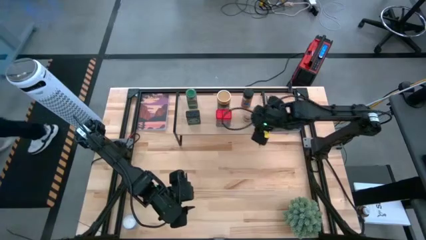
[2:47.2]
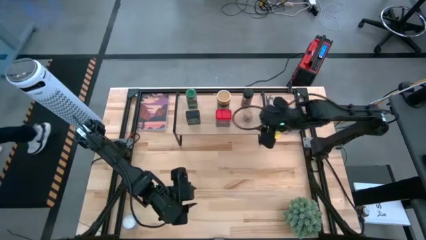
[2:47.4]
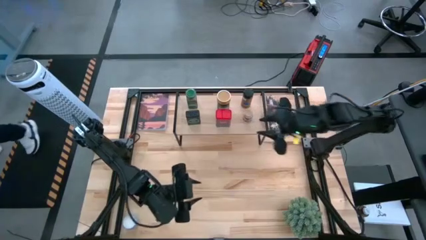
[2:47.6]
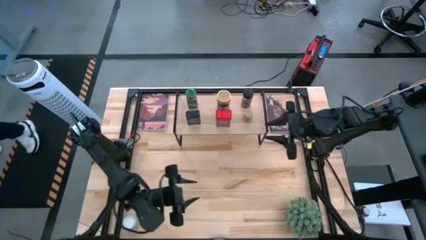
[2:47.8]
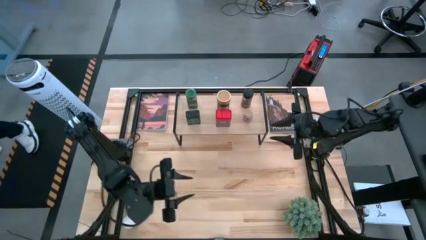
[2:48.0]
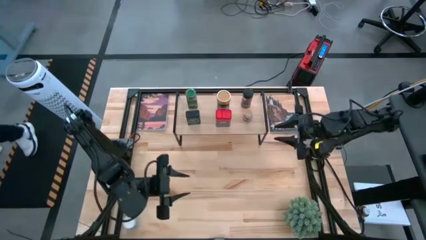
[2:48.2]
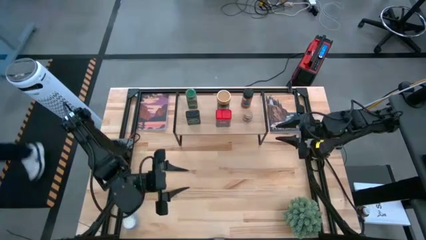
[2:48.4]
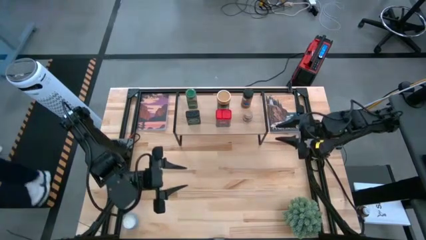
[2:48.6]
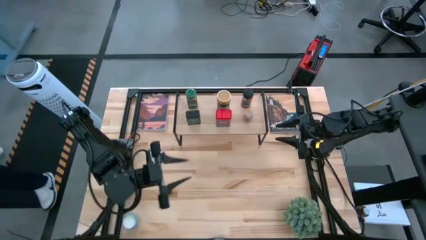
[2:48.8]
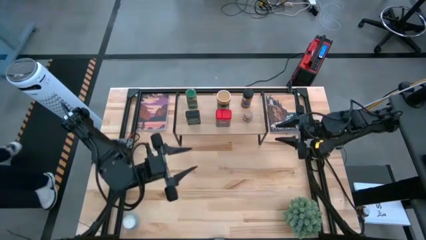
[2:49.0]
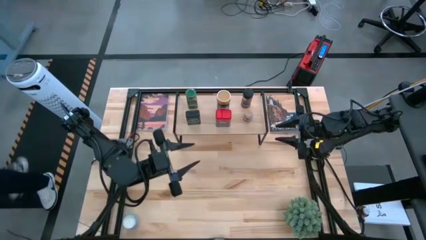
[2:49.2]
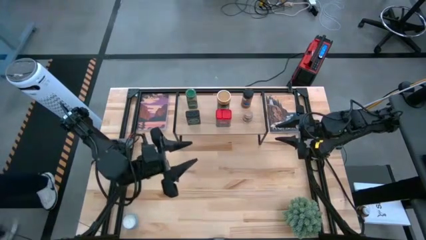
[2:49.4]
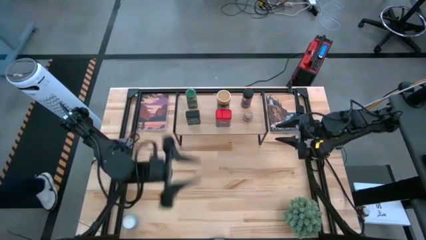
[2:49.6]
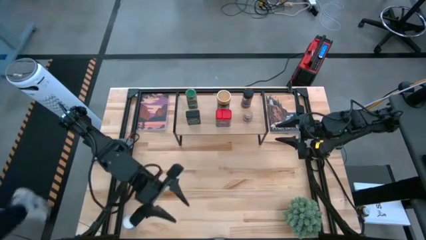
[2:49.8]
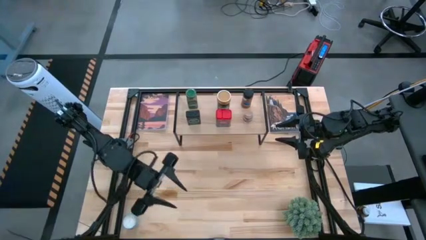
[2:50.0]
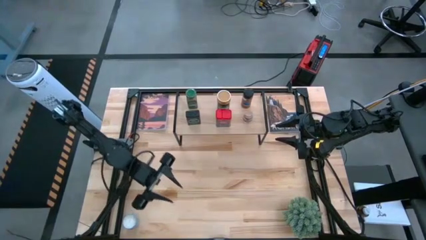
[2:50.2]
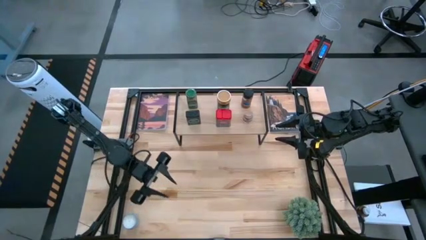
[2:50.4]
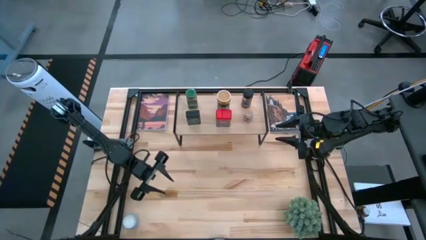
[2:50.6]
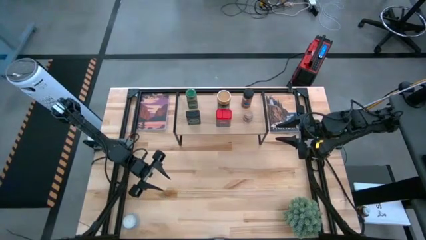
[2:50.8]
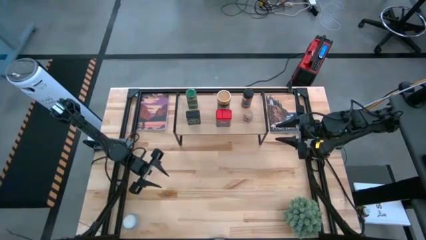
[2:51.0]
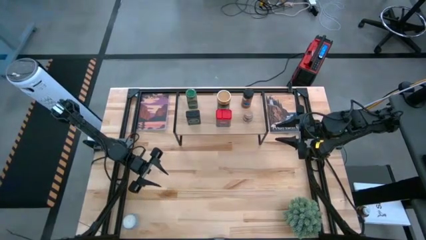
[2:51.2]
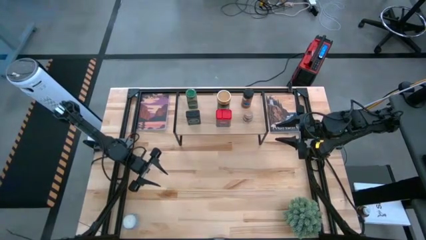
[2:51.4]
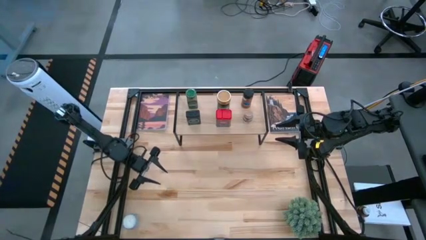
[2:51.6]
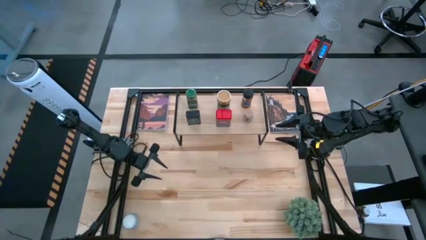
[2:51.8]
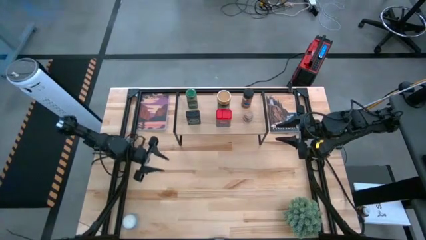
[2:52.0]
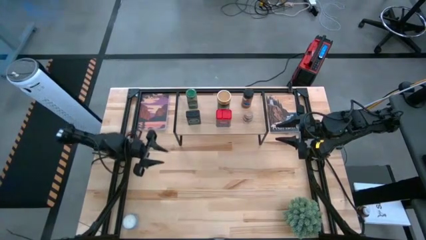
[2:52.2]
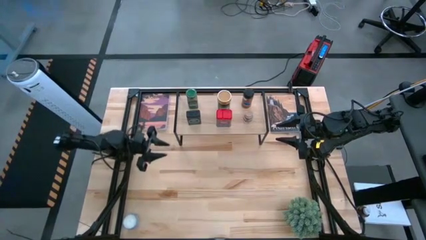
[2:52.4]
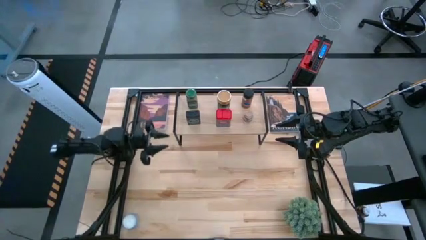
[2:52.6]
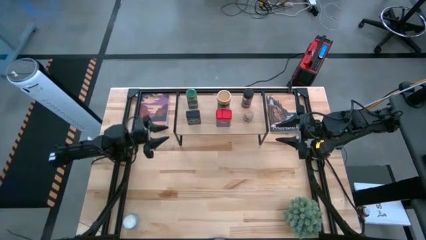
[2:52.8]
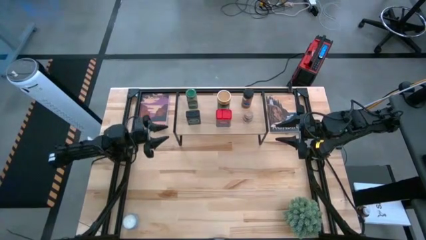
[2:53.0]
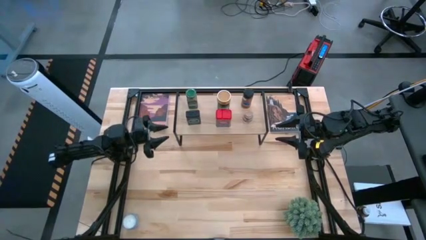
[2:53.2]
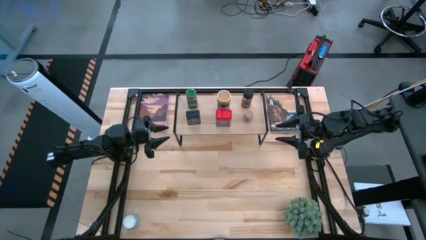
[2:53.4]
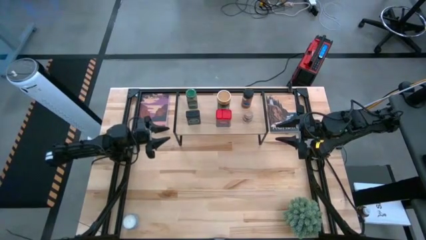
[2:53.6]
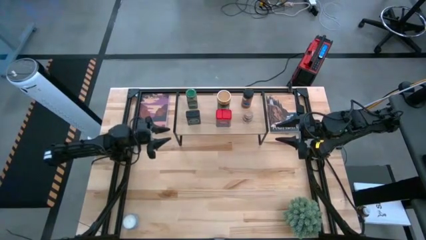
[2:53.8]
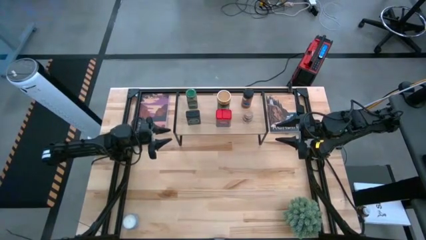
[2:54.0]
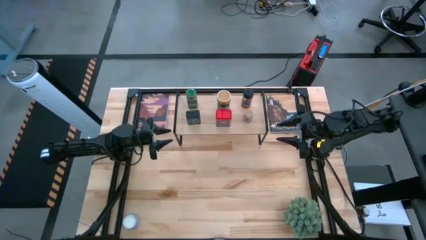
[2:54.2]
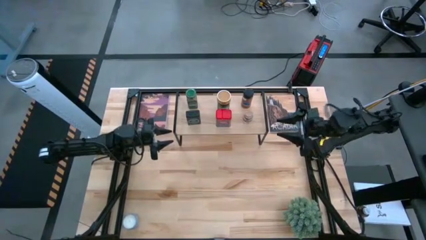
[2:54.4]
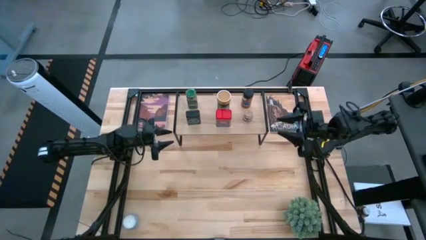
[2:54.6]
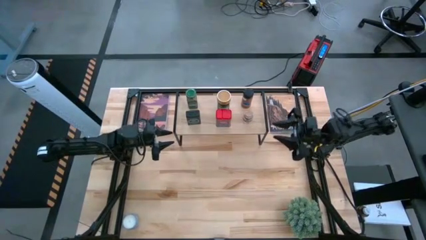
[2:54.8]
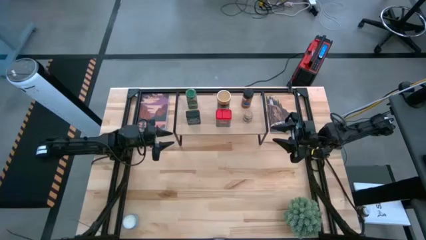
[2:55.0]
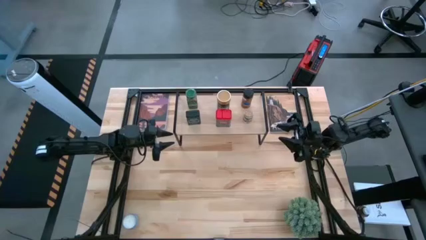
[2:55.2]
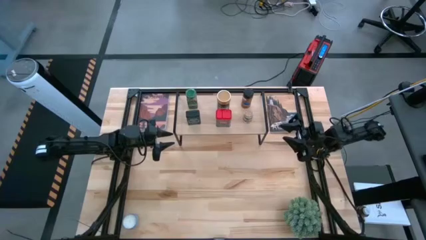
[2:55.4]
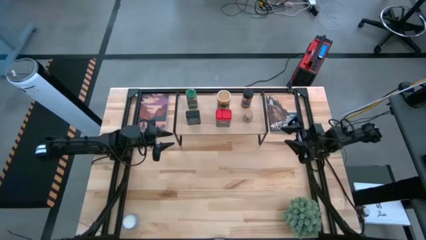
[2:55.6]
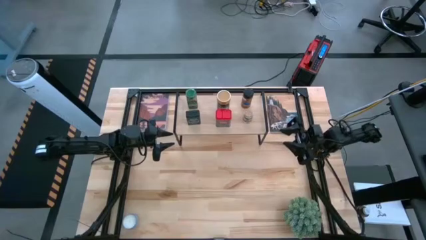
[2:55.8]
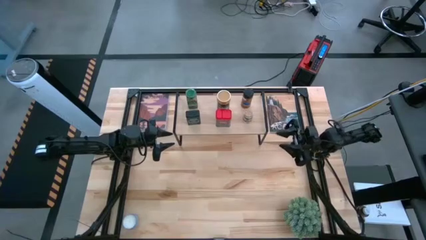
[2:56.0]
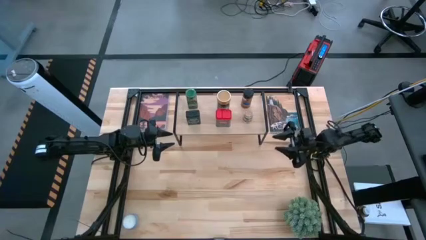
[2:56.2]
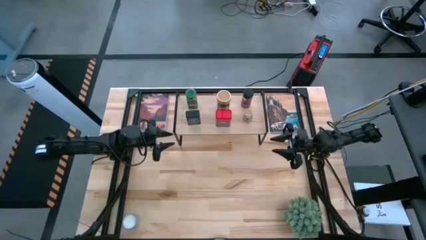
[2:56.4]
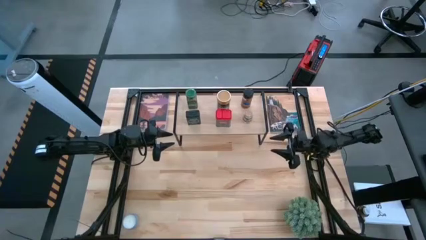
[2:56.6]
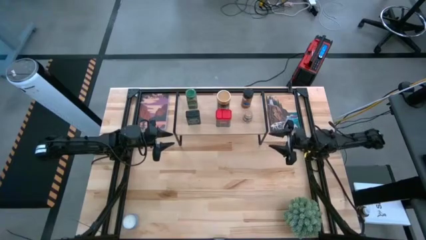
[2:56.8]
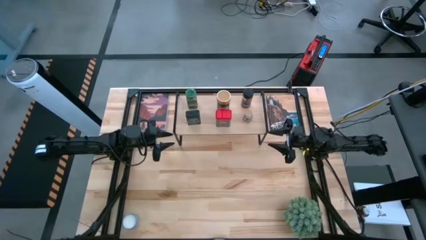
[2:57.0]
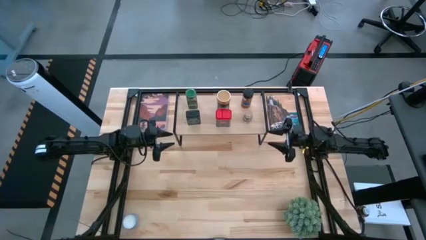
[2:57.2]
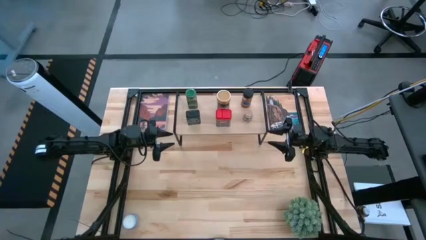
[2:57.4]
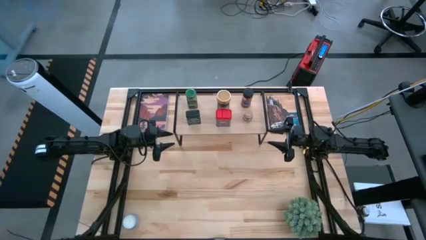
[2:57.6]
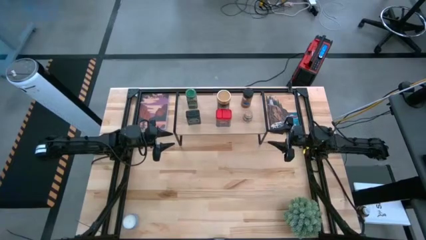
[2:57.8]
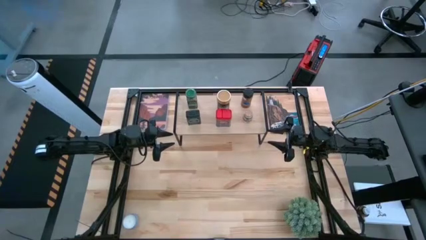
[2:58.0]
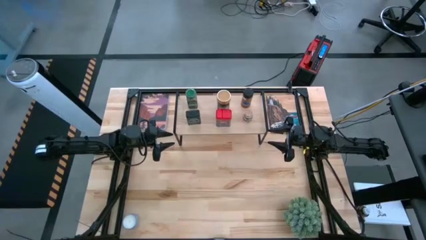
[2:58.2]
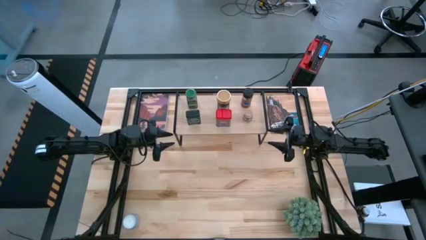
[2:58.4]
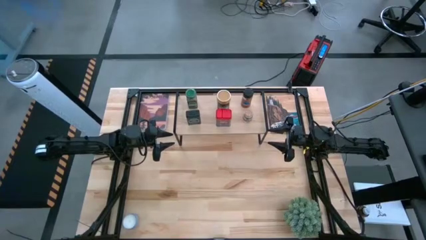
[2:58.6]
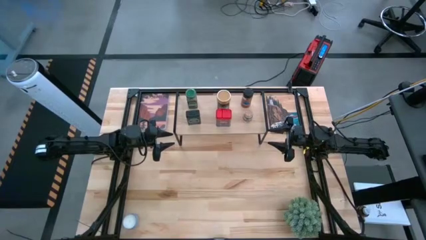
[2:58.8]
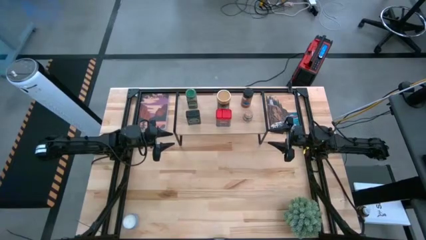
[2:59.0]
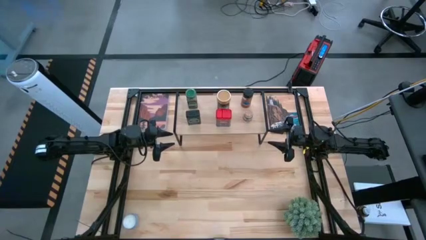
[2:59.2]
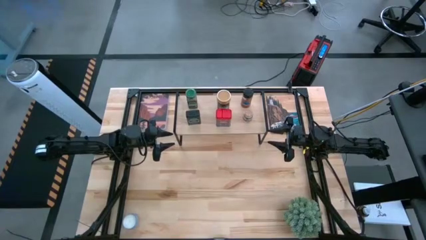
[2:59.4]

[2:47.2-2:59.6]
Task: Shelf spices
Return to Home Position

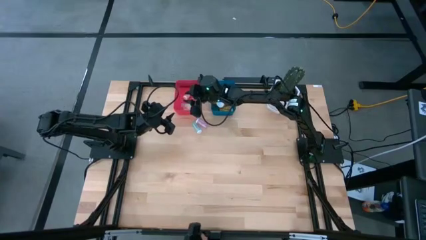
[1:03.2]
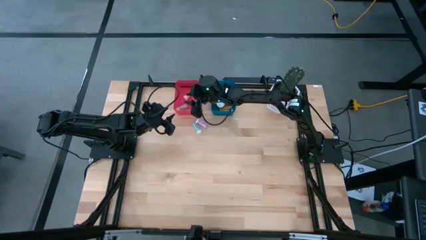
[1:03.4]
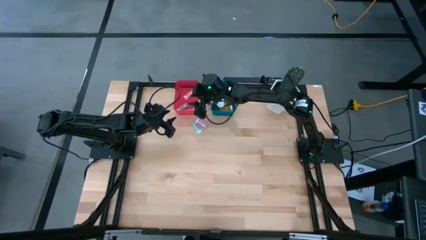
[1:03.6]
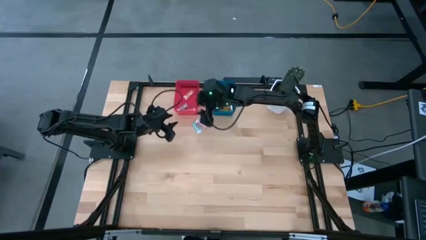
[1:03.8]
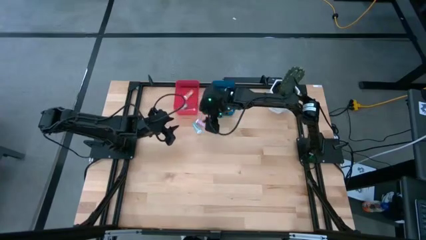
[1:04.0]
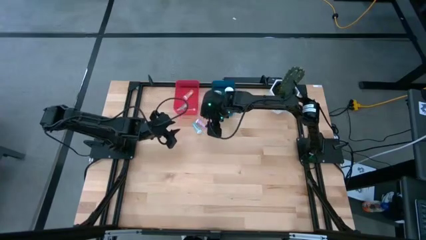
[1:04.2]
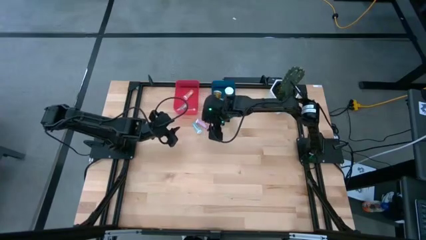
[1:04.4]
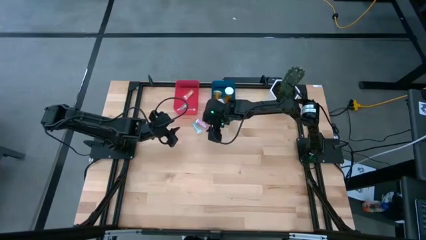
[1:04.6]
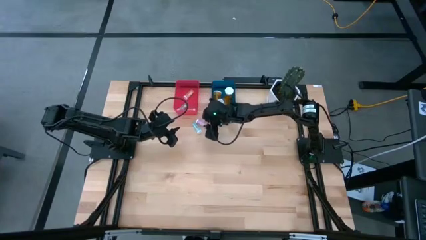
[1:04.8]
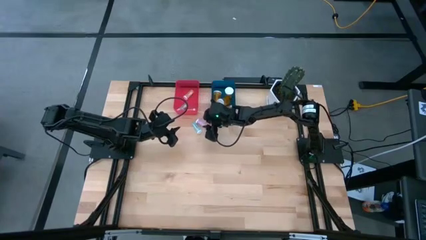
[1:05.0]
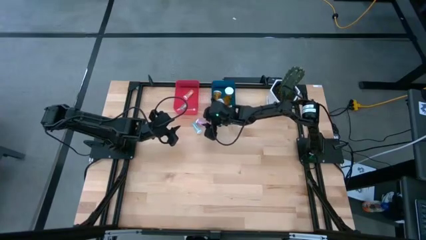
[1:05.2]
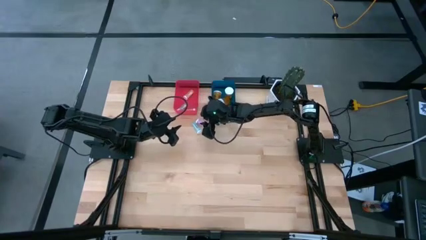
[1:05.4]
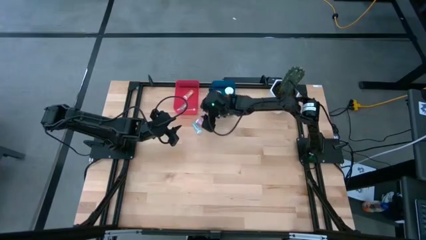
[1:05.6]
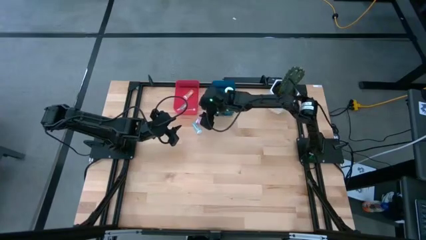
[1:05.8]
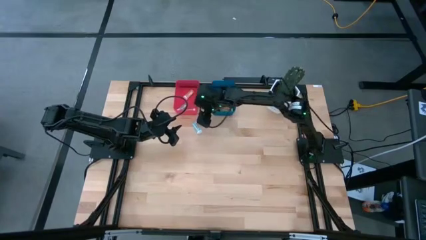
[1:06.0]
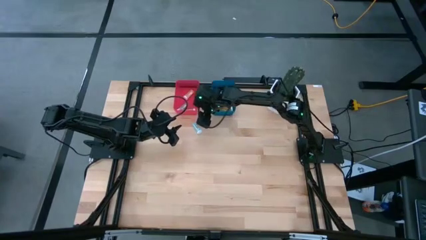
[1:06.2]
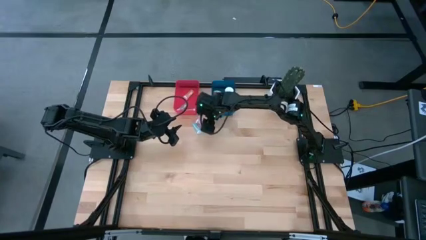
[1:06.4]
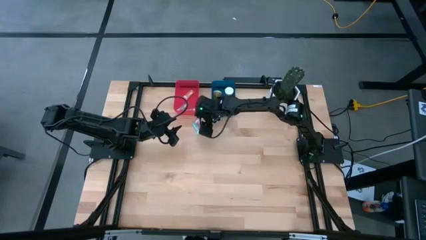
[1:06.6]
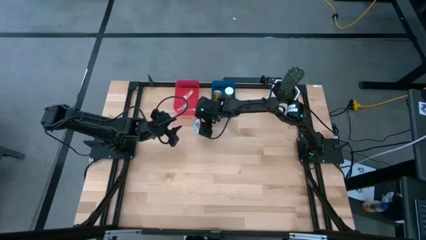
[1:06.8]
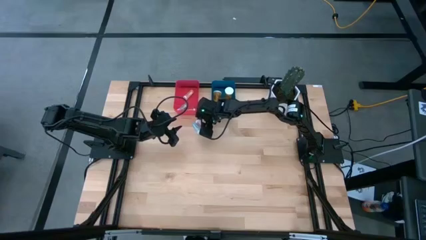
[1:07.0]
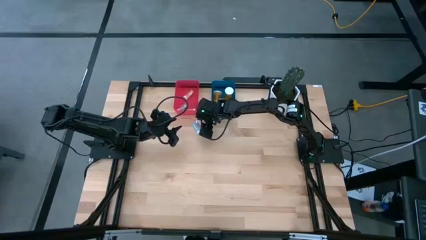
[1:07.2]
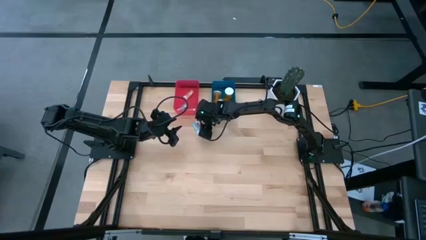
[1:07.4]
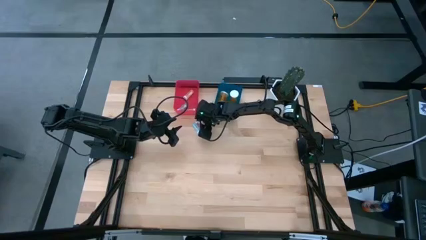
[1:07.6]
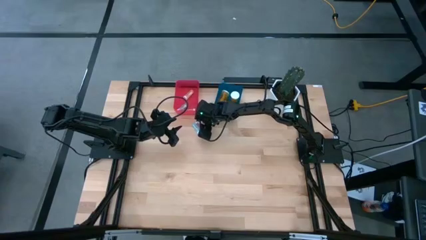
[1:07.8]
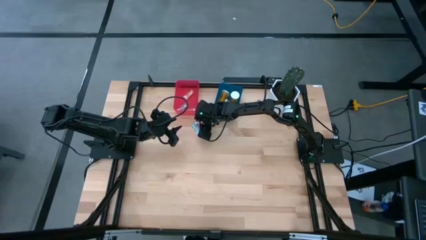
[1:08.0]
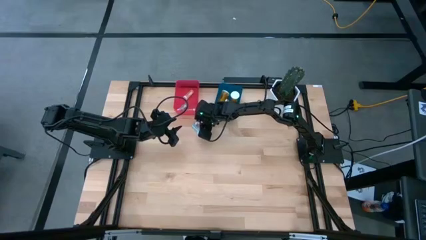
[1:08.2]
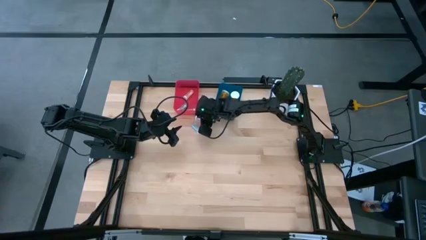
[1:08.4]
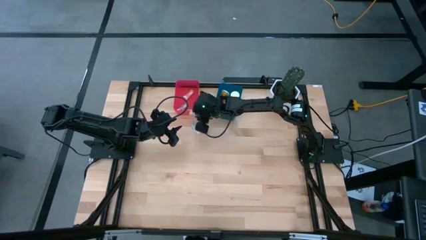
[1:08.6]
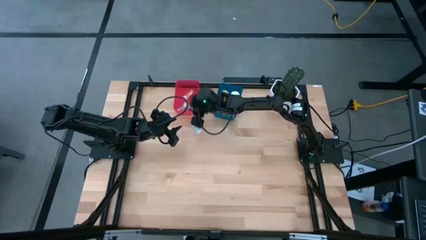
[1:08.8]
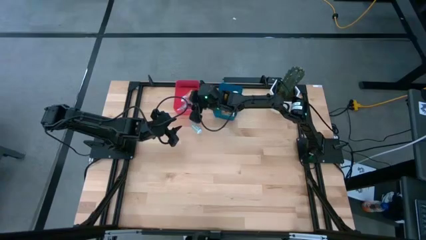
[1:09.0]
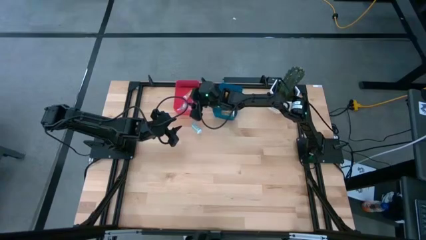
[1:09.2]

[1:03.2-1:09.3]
Task: Pick and place medicine bottles into bin by pill shape (circle, oval)
Put the pink tablet bottle into the red bin
